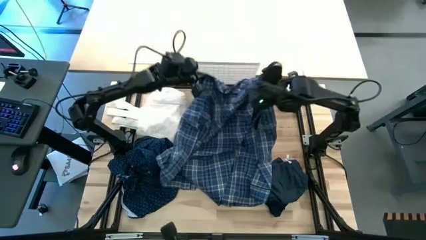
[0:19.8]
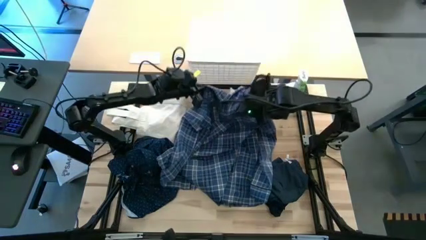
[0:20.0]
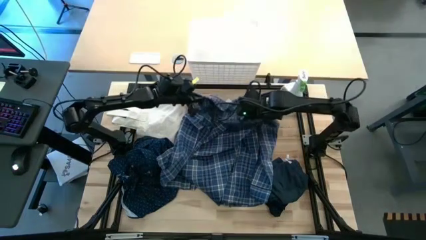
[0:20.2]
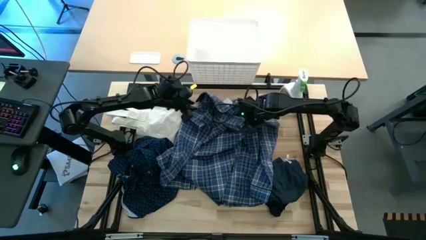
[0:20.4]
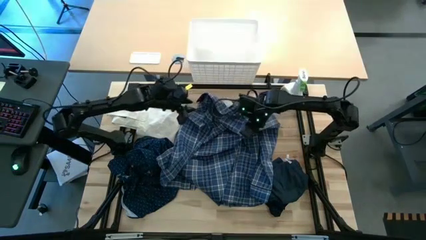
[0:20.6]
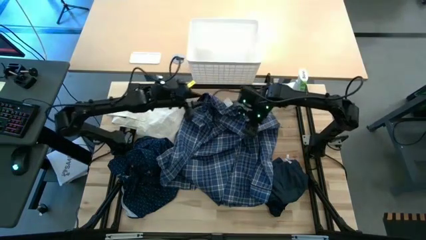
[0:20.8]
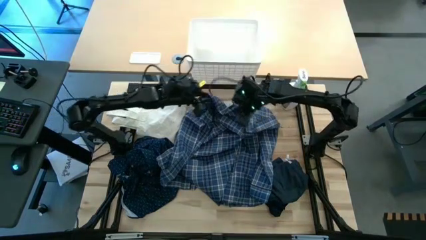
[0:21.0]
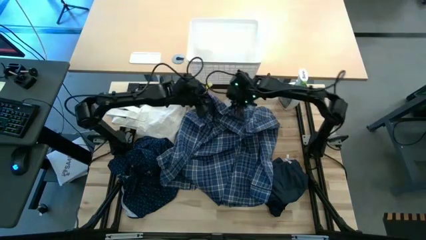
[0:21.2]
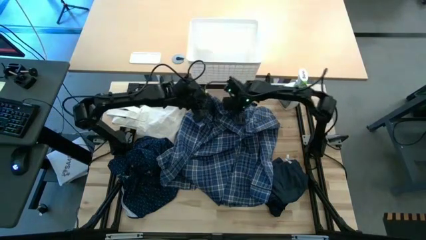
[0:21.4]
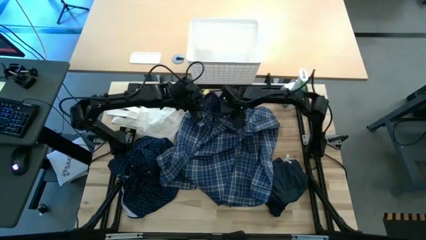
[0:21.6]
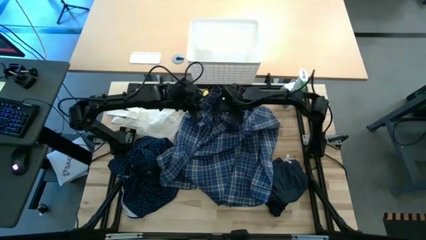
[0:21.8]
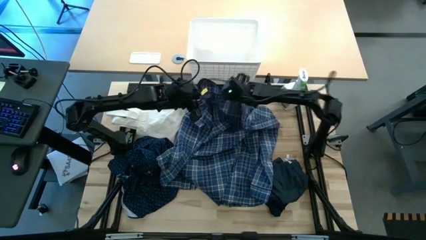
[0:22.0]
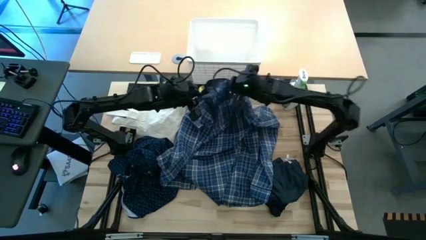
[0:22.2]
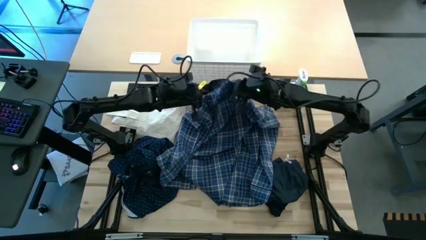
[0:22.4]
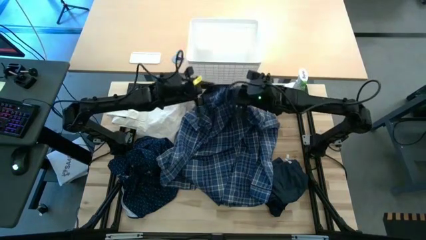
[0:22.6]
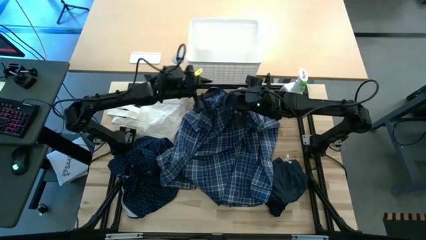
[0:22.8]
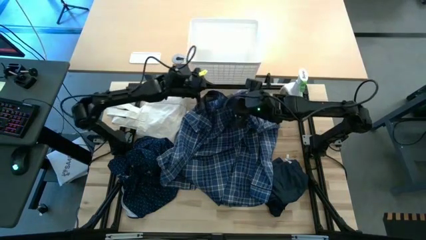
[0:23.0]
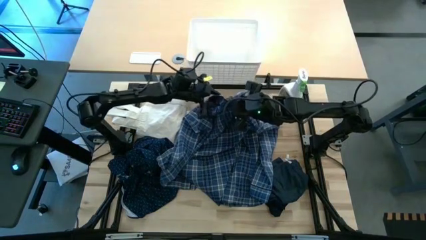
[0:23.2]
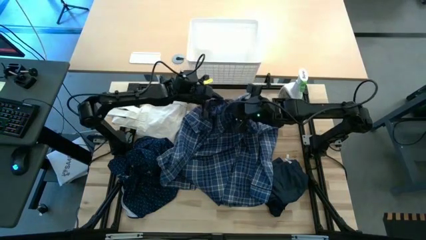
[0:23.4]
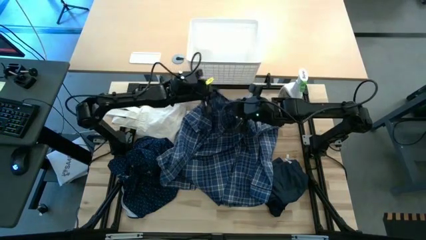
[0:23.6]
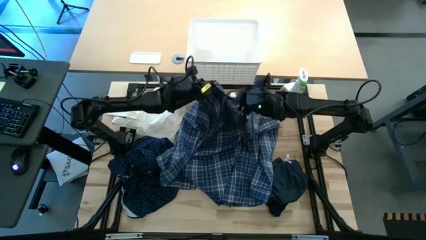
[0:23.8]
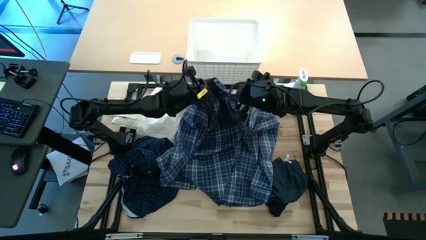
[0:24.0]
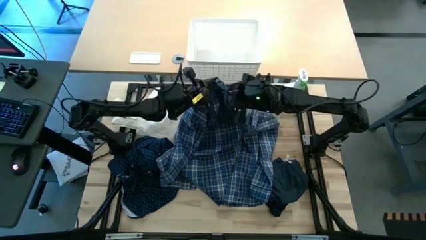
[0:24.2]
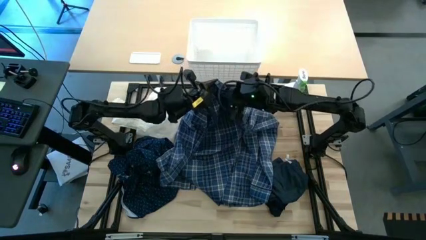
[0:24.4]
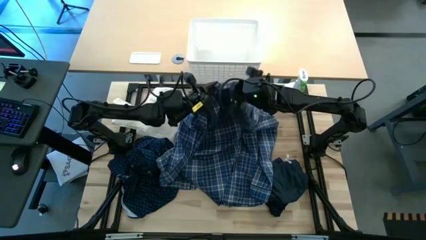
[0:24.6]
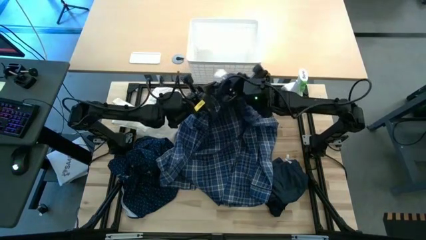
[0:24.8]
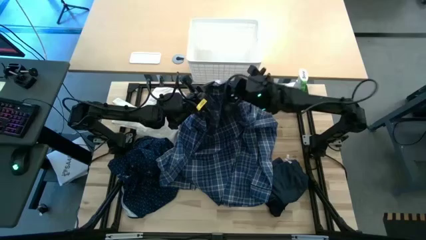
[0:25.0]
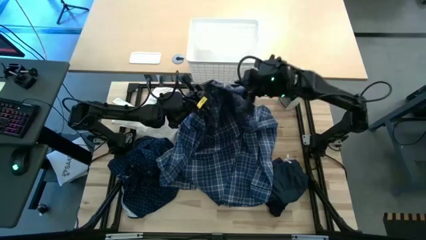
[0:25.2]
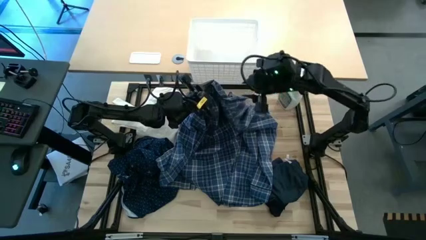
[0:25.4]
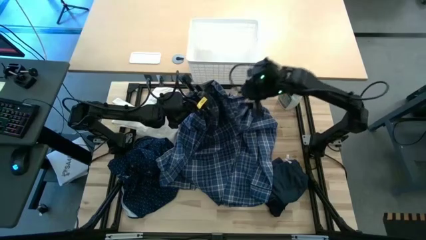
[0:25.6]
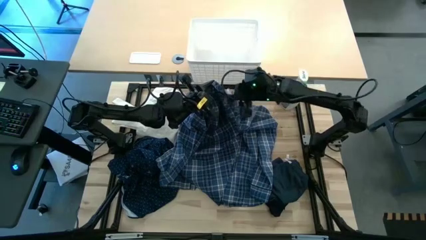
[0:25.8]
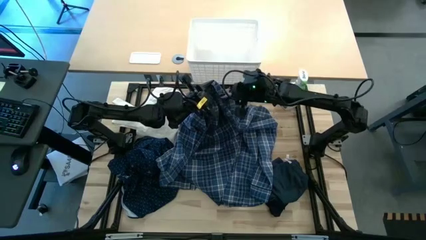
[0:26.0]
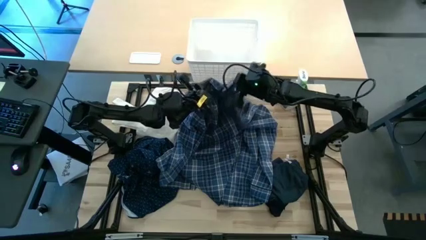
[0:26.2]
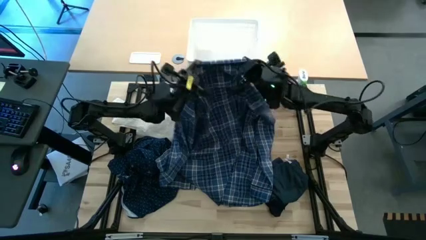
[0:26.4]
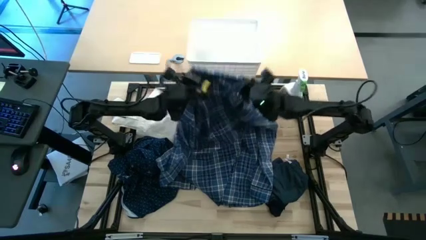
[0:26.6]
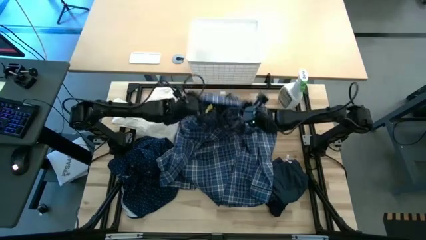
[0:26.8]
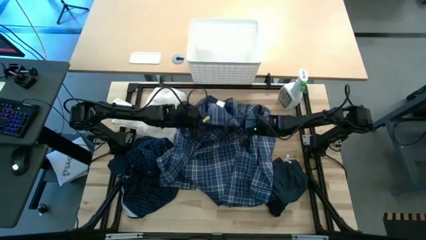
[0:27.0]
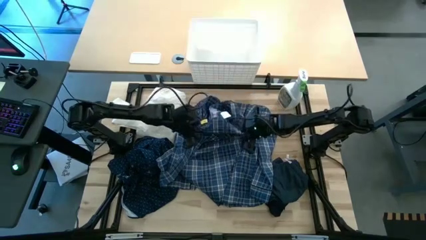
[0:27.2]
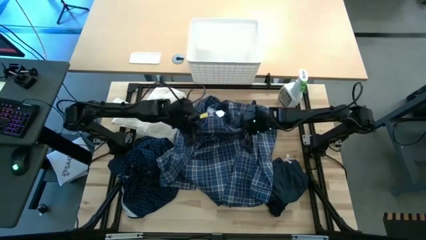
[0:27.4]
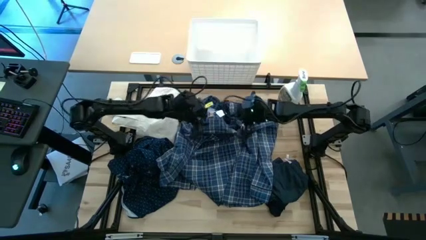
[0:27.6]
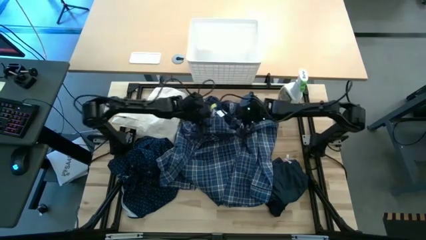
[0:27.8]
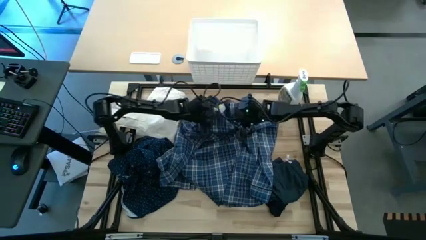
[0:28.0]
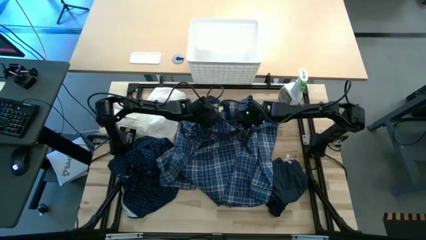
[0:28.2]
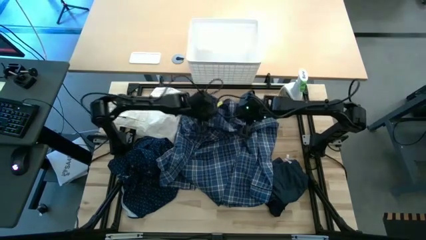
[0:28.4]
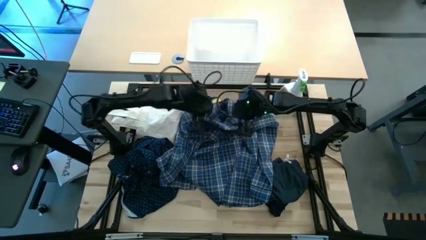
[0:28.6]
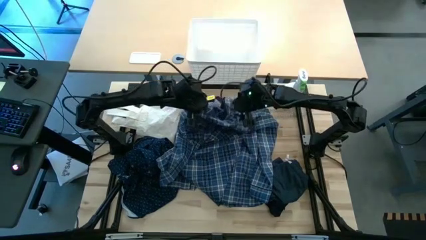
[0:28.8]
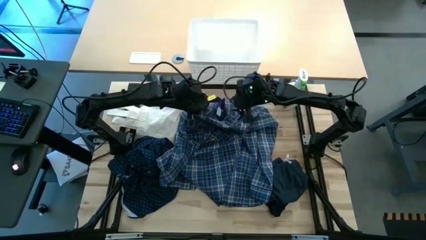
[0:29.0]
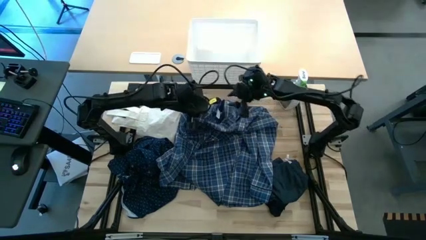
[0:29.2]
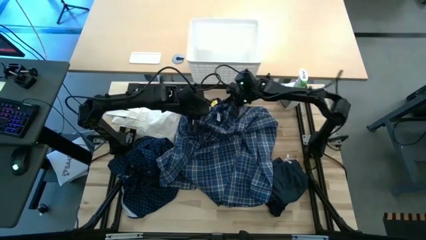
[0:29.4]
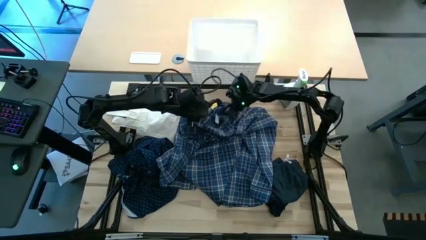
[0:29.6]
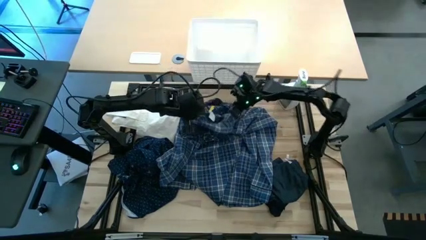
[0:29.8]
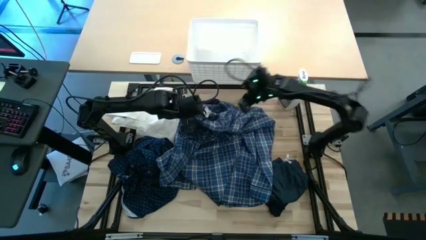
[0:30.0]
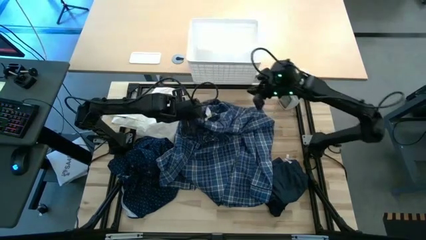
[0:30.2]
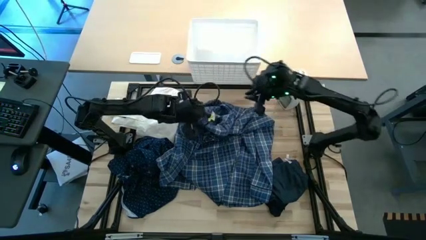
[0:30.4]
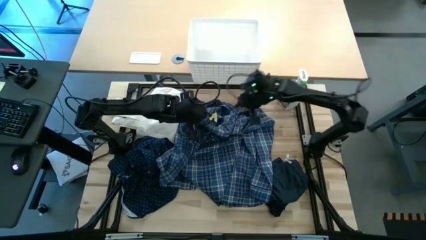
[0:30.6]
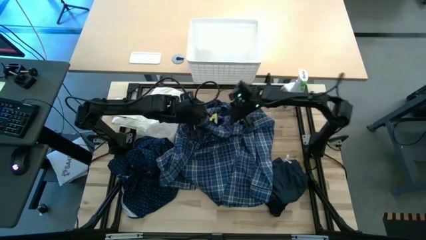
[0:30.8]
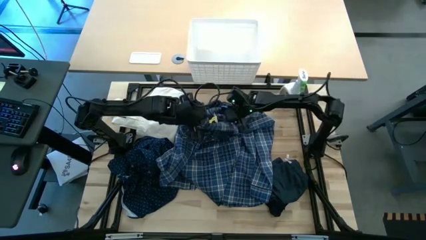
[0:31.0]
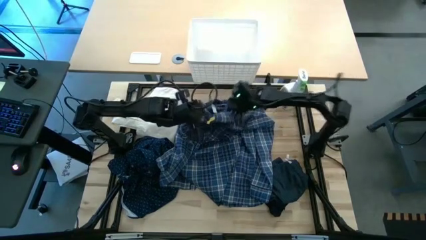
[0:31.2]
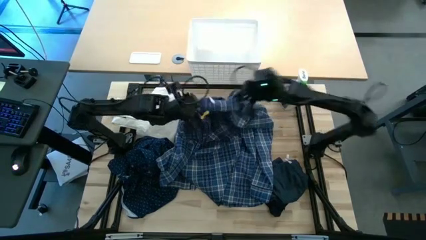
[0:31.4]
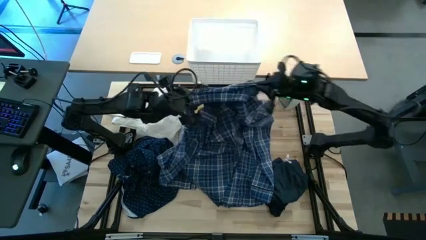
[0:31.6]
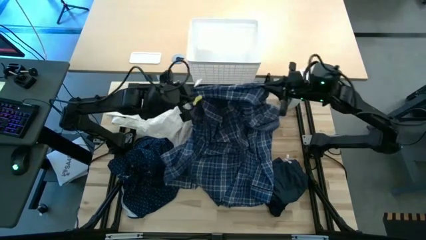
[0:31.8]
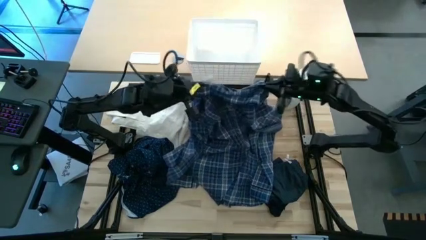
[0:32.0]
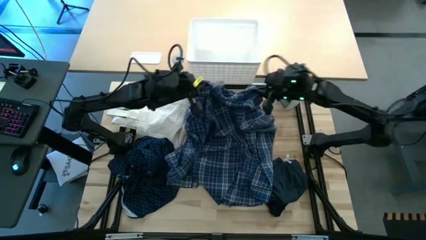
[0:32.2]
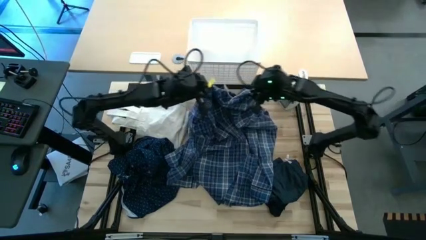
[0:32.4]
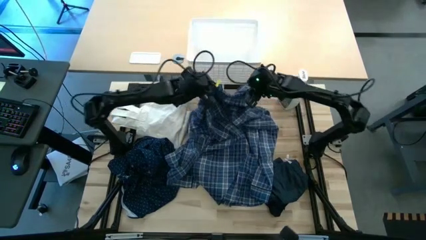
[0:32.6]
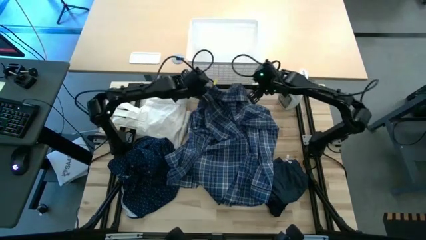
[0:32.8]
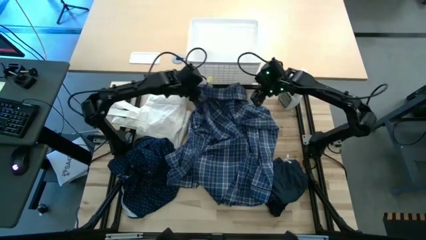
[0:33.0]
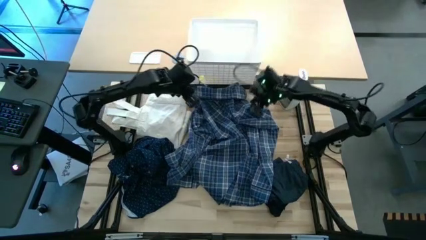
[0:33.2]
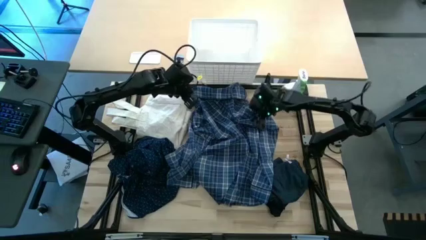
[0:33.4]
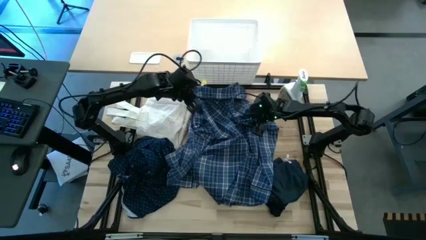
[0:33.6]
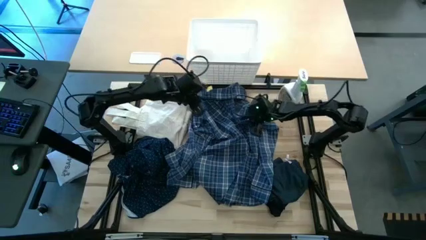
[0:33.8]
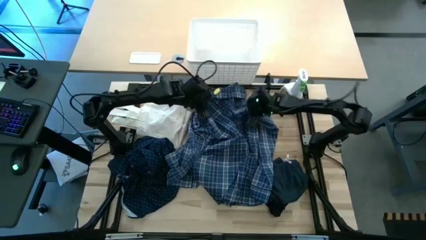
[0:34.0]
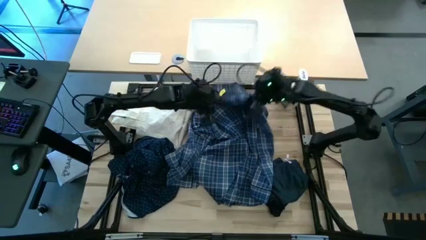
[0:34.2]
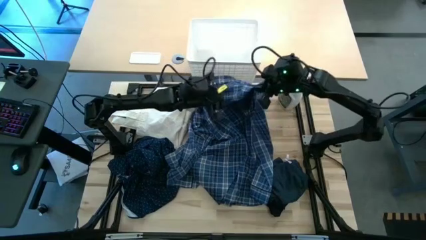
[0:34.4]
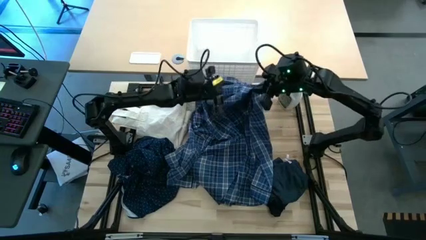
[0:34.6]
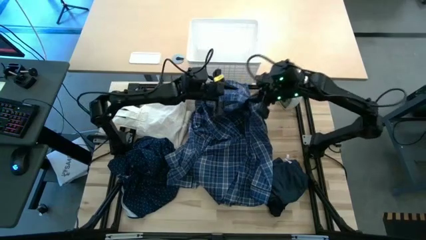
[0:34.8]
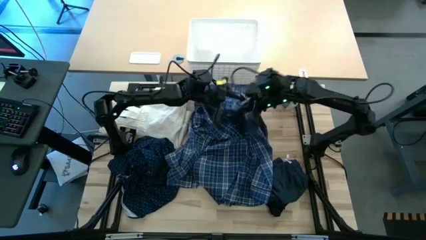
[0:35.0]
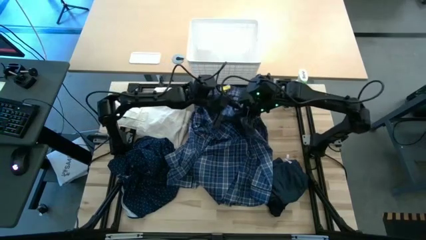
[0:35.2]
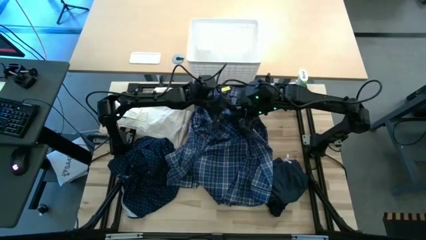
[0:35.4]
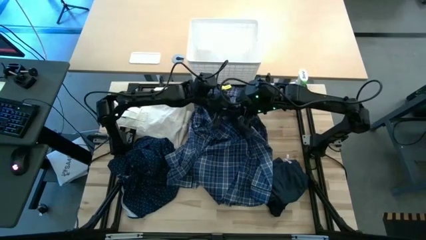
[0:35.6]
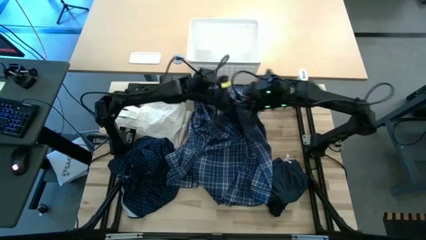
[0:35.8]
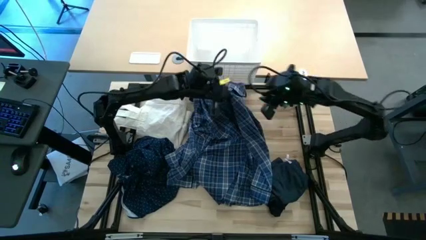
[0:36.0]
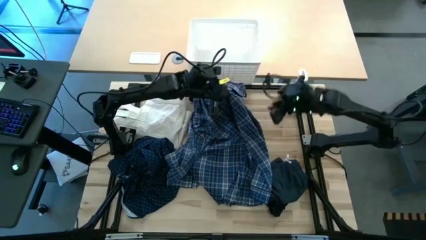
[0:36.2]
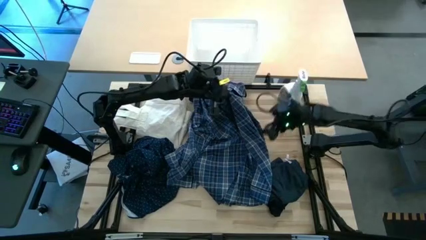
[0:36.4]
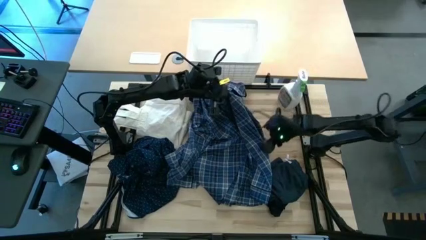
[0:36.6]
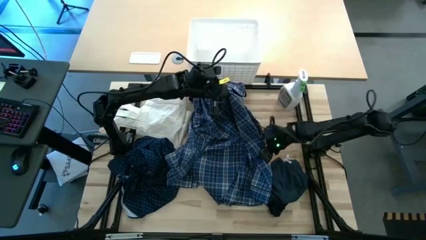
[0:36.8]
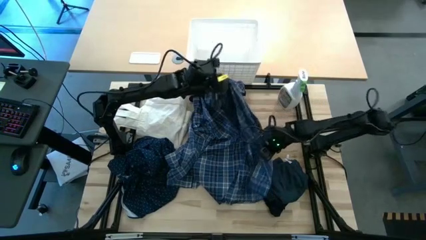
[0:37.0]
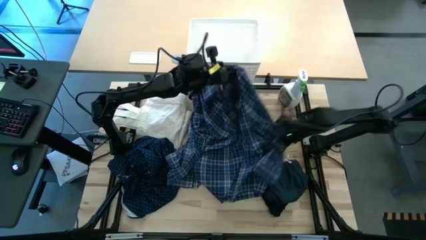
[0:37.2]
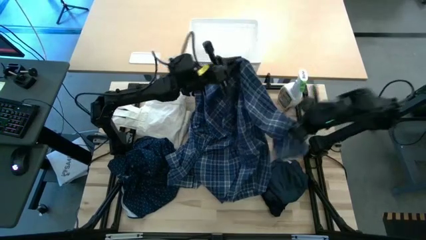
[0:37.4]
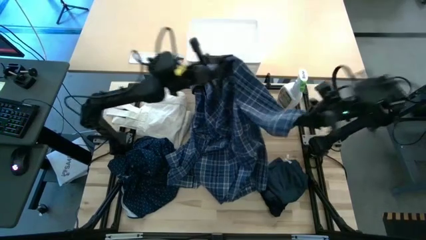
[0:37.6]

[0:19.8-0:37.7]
Fold the blue checkered long sleeve
